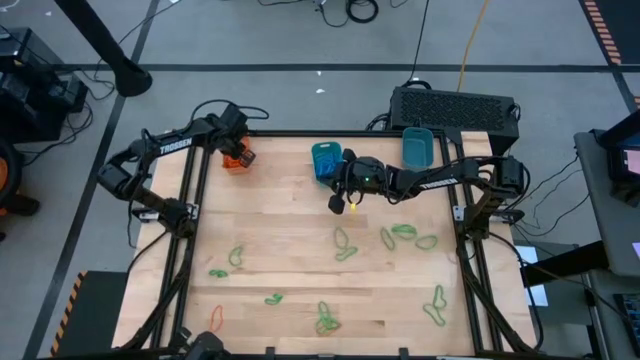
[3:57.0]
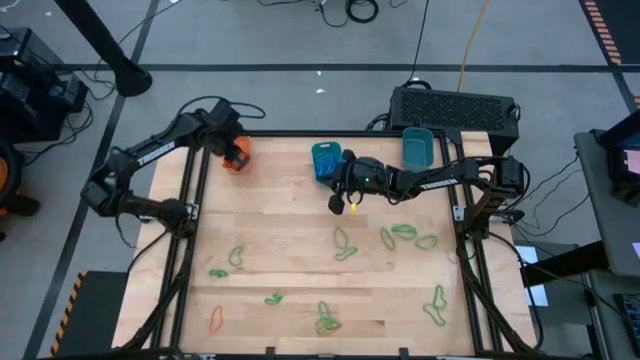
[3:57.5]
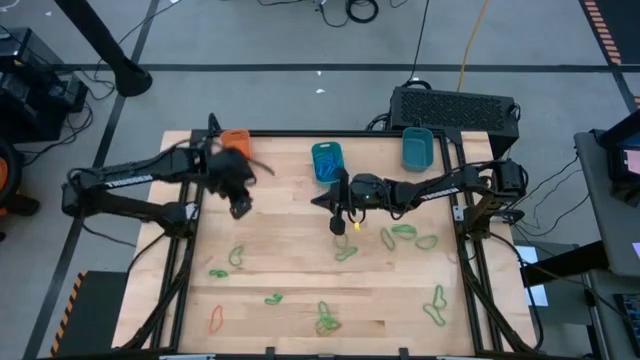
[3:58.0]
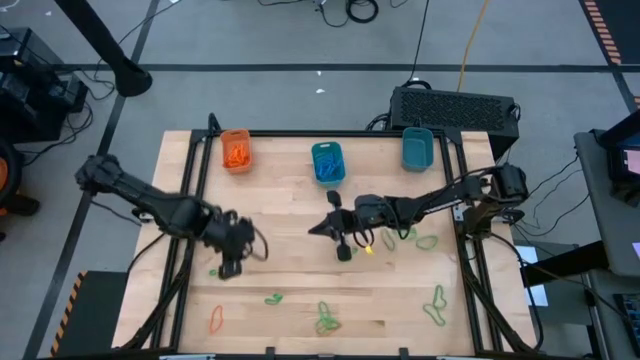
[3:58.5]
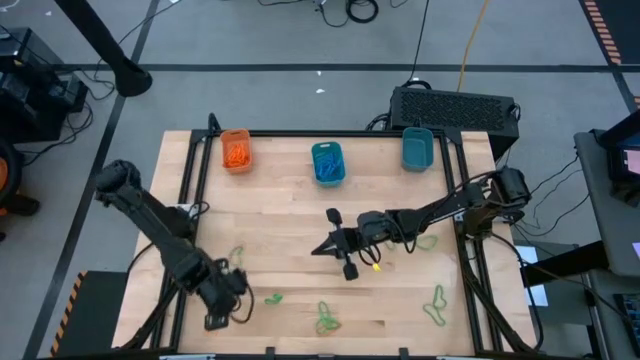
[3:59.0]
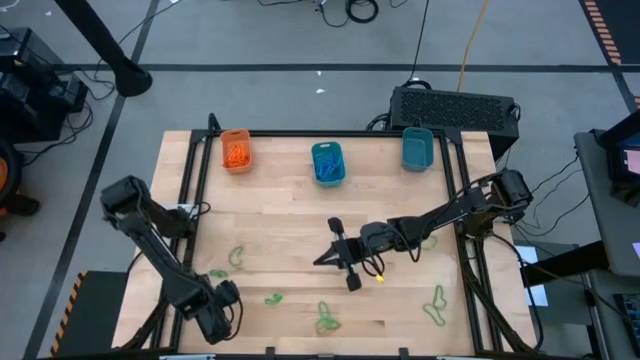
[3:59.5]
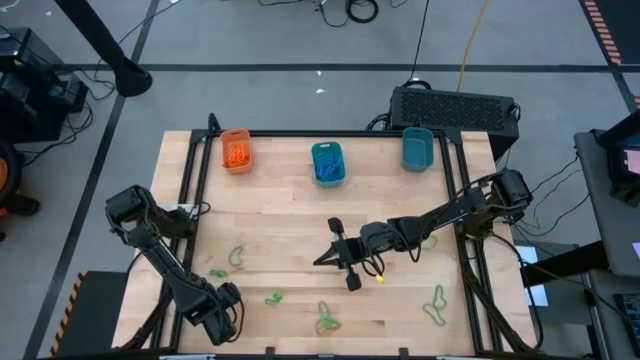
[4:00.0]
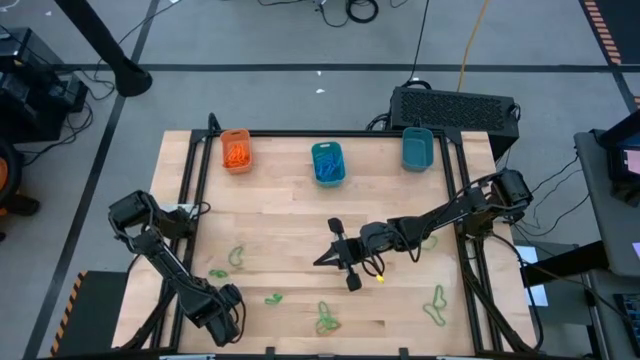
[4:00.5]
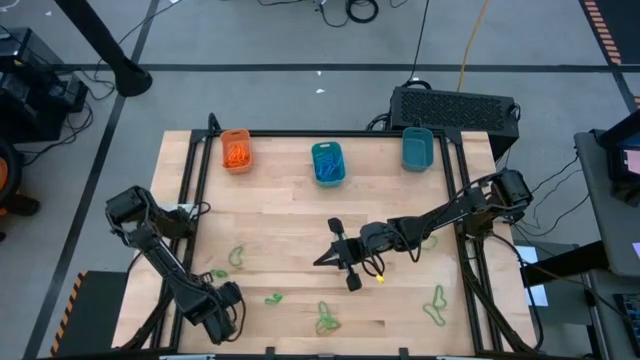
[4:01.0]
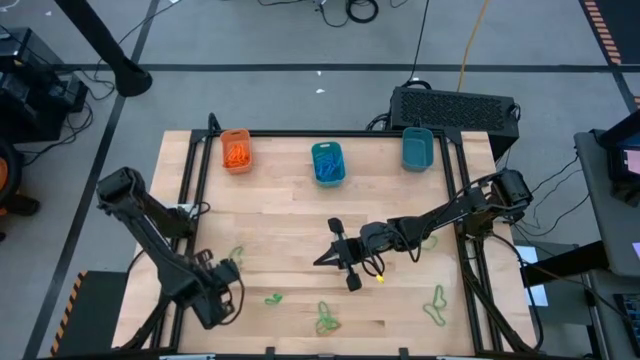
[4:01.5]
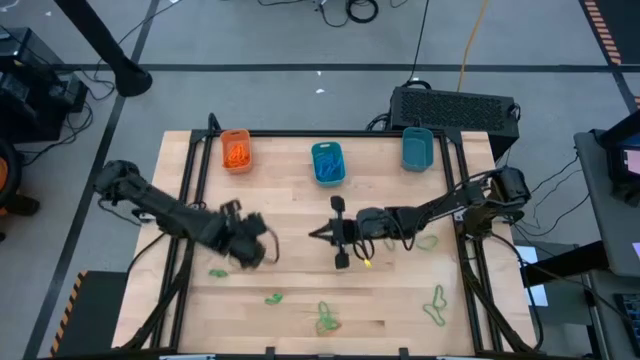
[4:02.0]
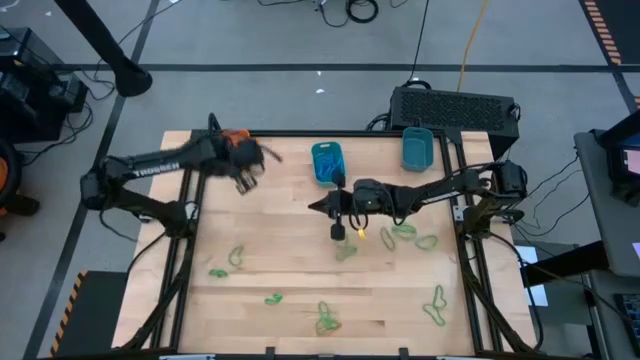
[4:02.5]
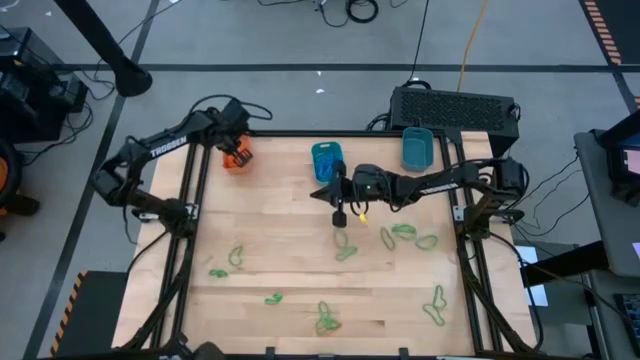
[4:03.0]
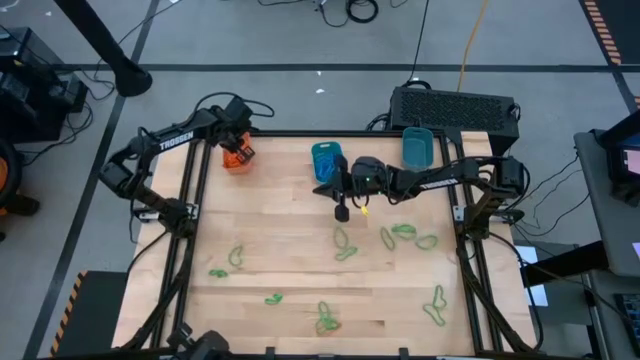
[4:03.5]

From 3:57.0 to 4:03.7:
Task: Sort rubber bands into baskets
Put the orange rubber band into the orange bin

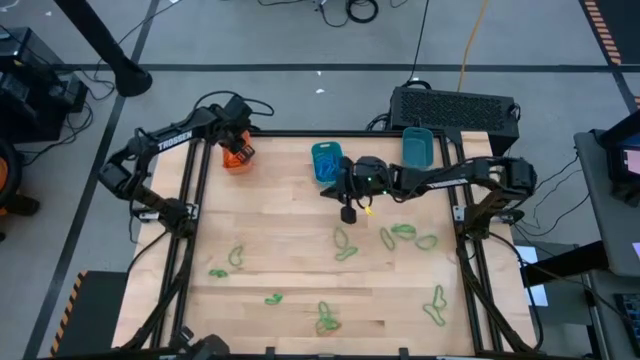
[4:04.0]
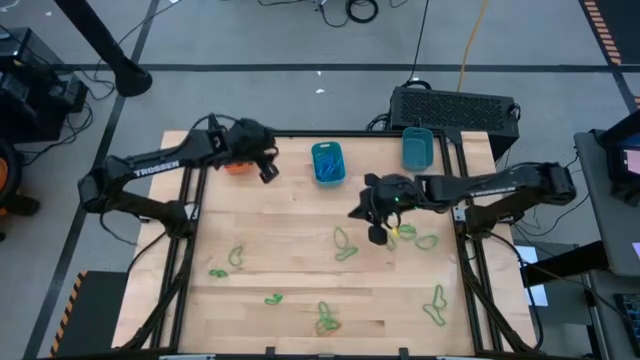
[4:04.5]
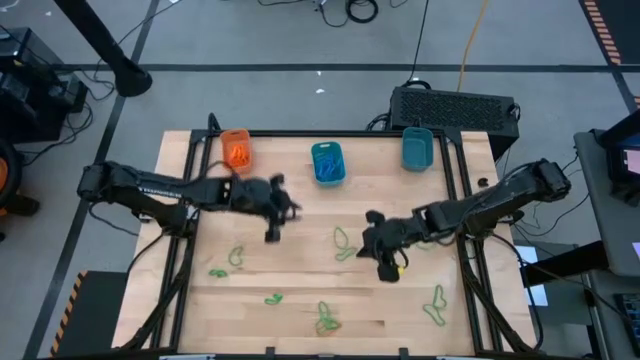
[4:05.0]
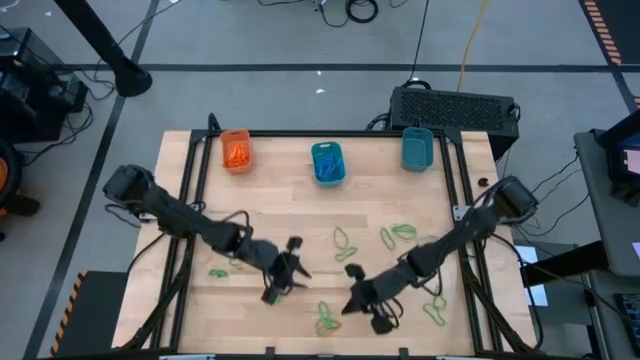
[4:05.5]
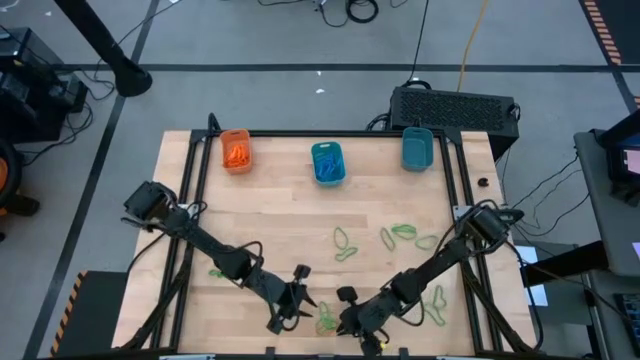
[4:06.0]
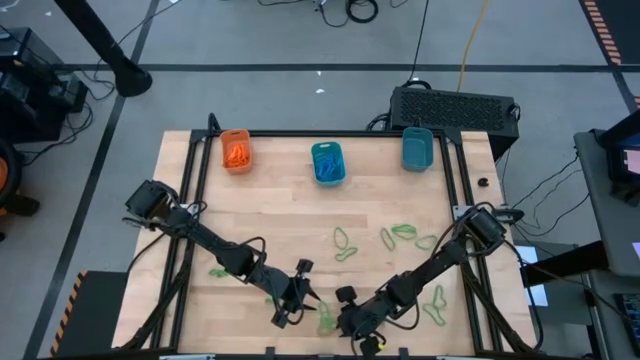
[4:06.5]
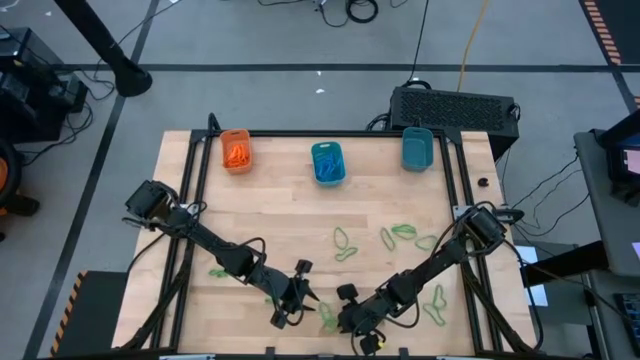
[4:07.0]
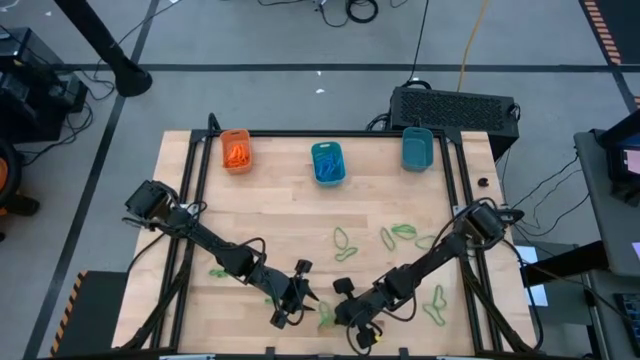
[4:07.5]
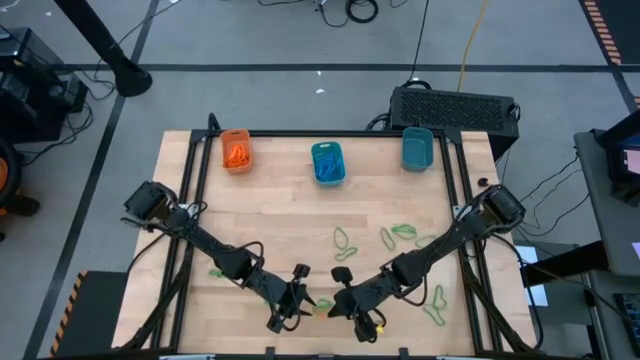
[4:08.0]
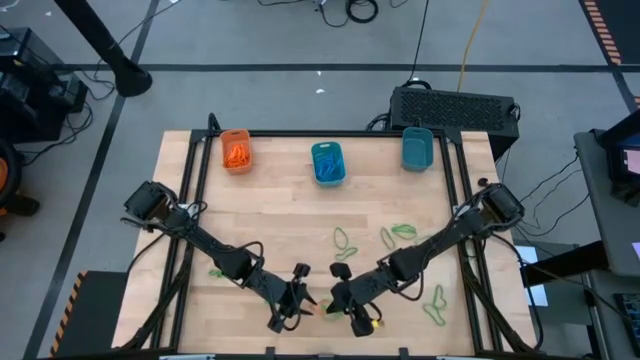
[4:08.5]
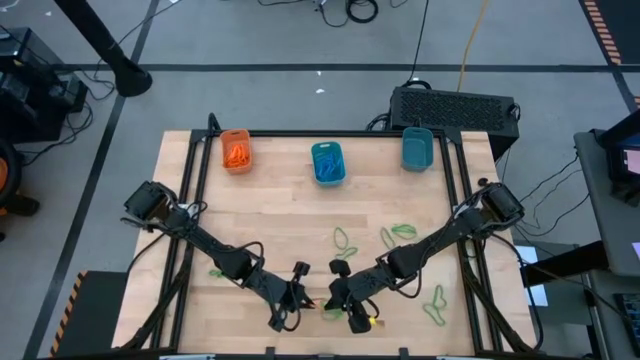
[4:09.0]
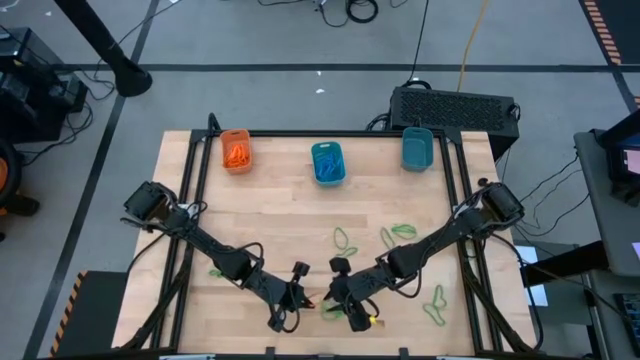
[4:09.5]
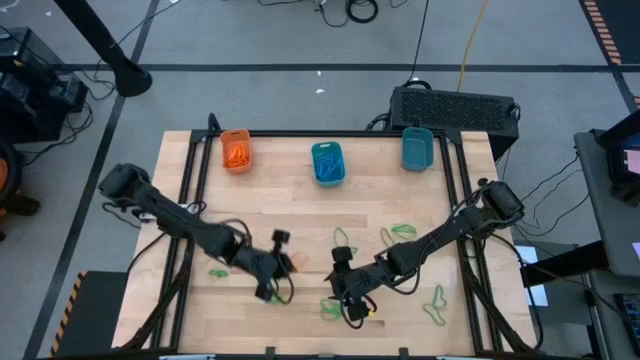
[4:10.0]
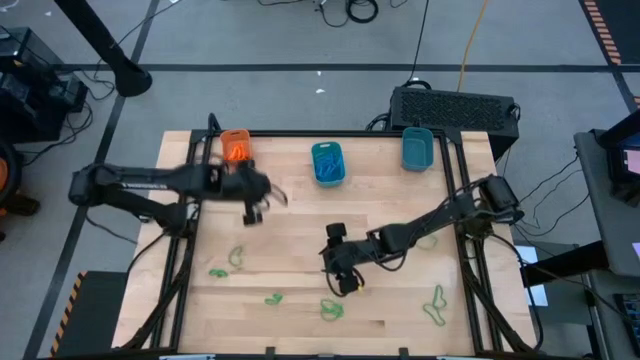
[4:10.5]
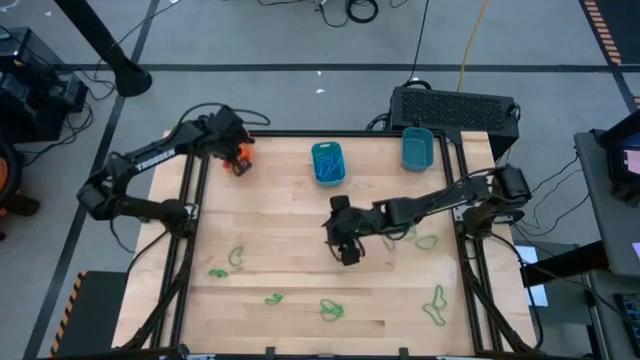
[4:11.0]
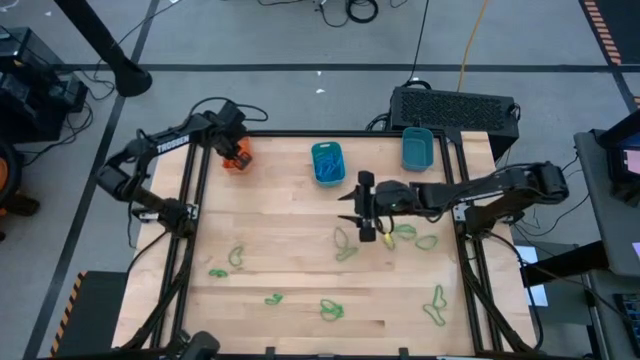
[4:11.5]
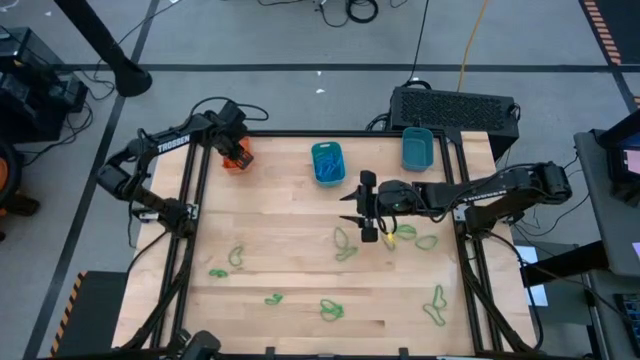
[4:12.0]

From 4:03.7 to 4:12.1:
Put the orange rubber band into the orange bin

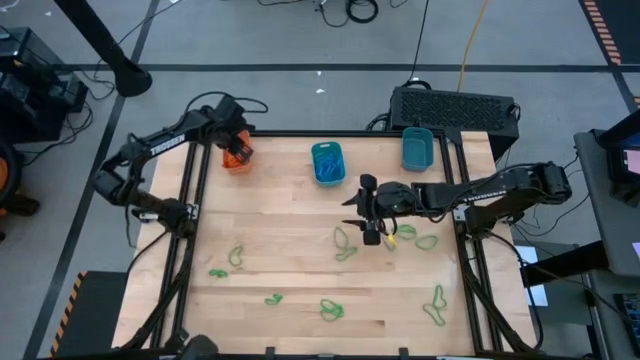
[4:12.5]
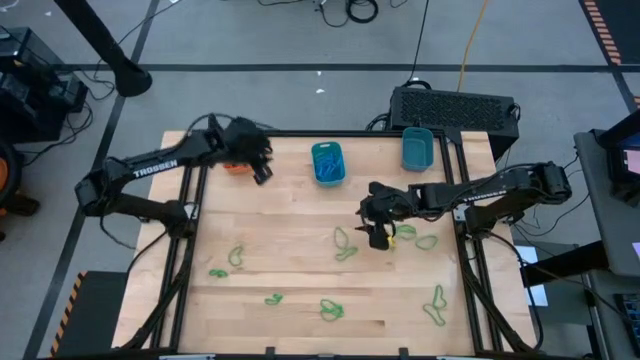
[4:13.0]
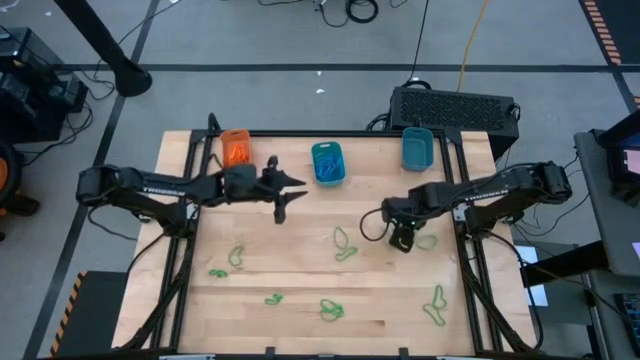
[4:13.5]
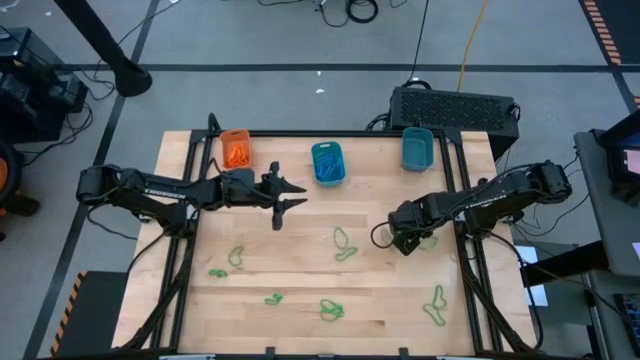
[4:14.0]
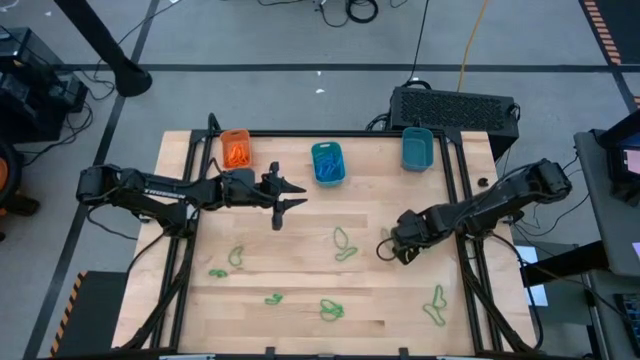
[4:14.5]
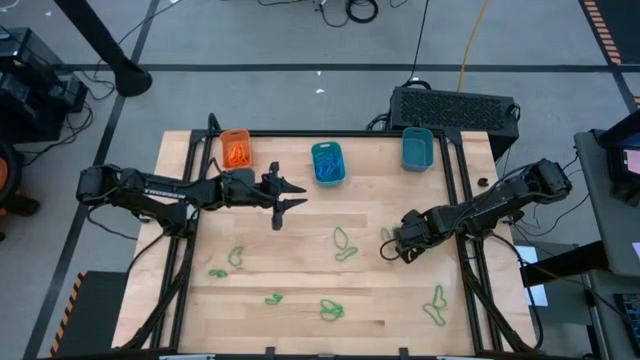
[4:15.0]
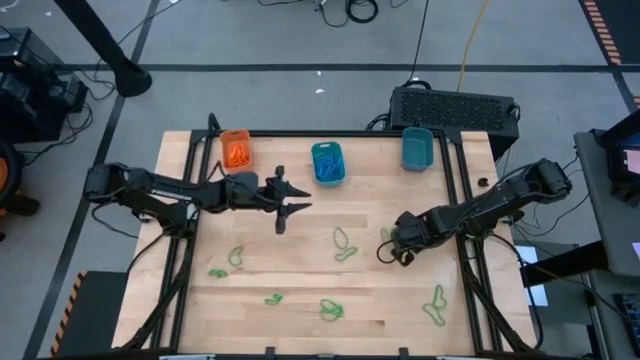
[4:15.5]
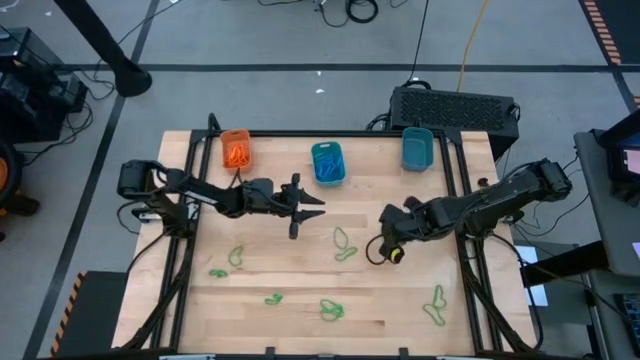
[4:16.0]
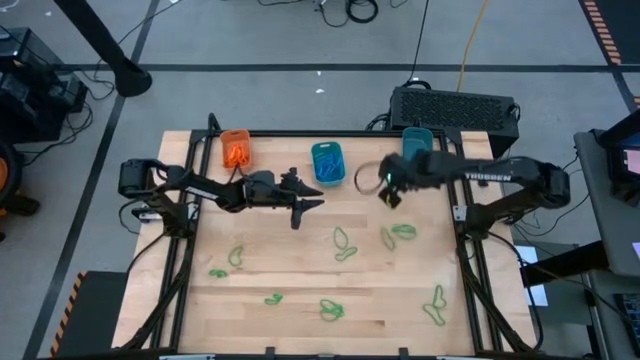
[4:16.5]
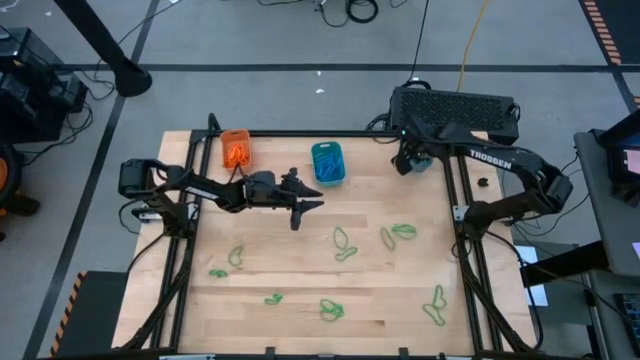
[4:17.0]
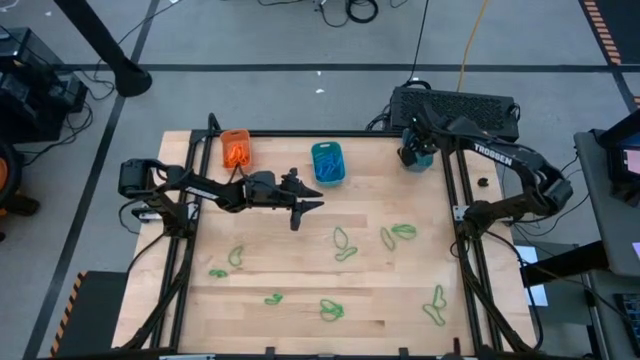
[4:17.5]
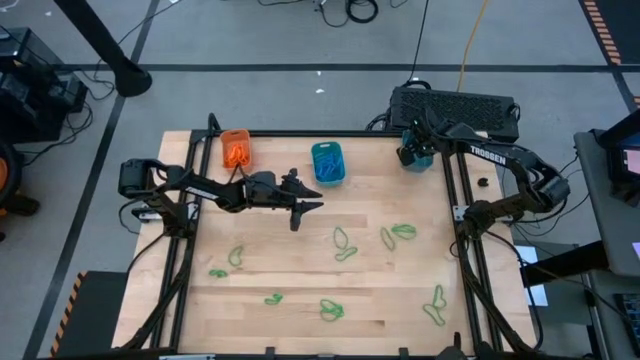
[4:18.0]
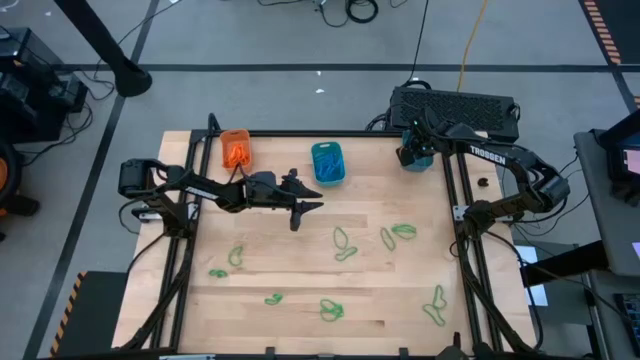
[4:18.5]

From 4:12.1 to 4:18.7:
Put the green rubber band into the dark blue bin
